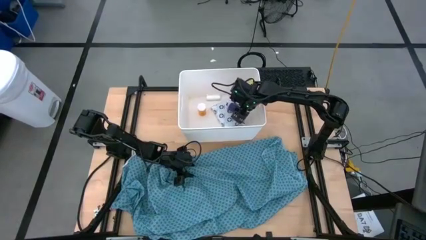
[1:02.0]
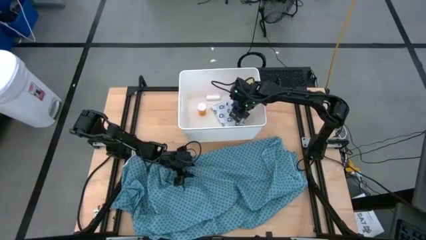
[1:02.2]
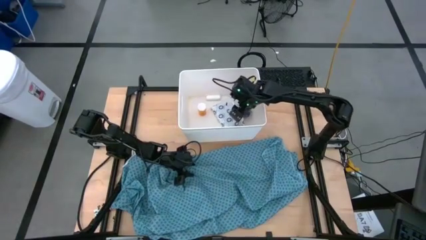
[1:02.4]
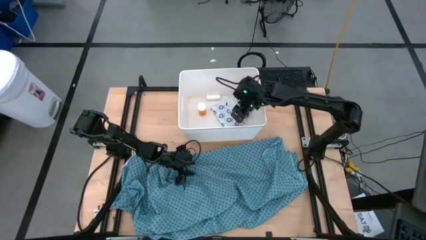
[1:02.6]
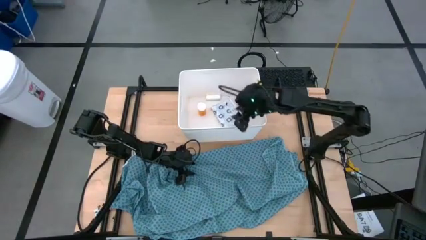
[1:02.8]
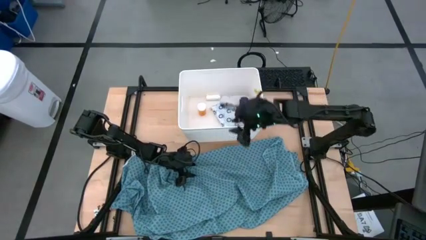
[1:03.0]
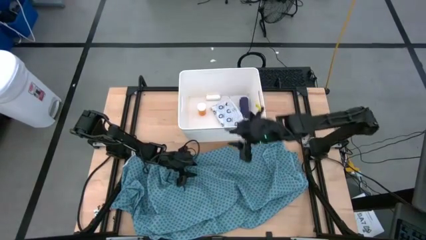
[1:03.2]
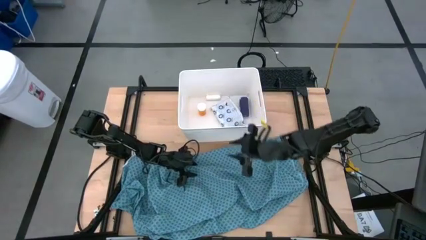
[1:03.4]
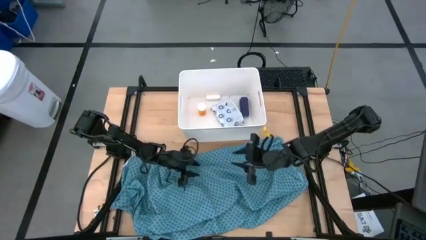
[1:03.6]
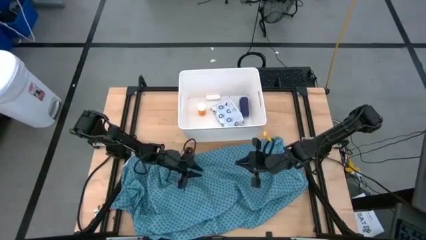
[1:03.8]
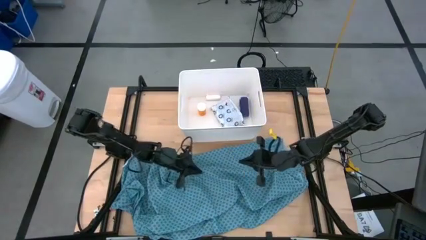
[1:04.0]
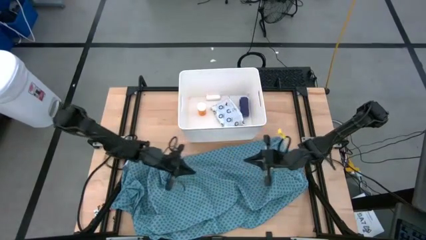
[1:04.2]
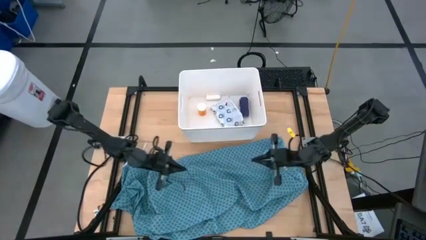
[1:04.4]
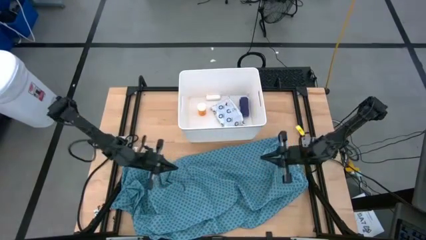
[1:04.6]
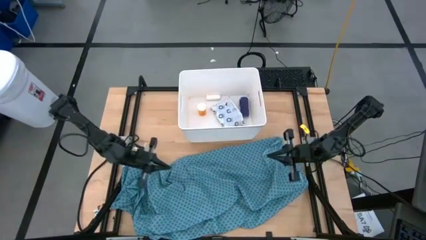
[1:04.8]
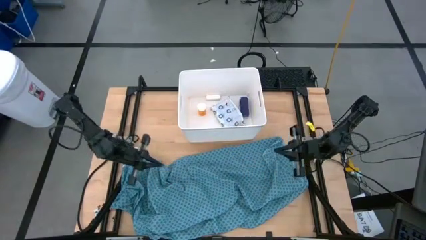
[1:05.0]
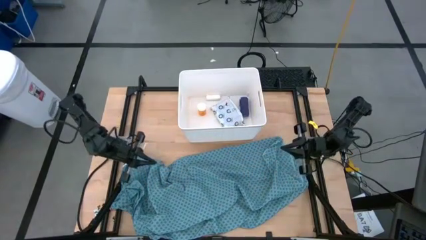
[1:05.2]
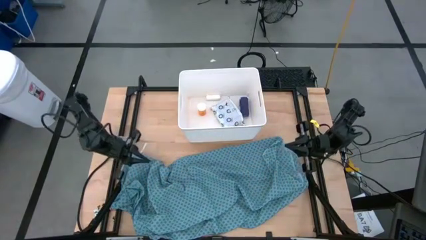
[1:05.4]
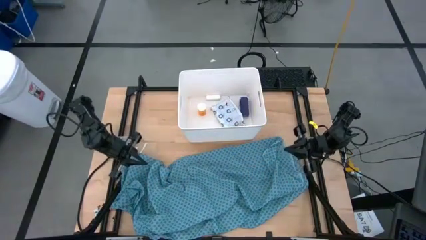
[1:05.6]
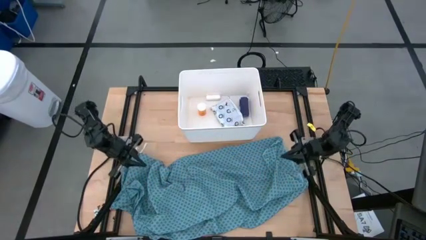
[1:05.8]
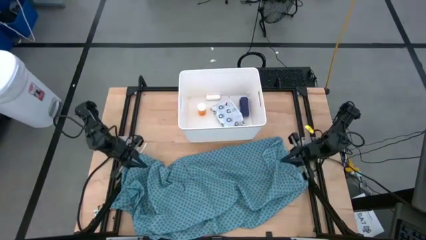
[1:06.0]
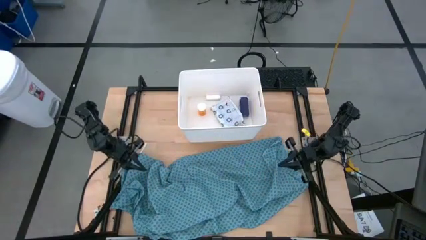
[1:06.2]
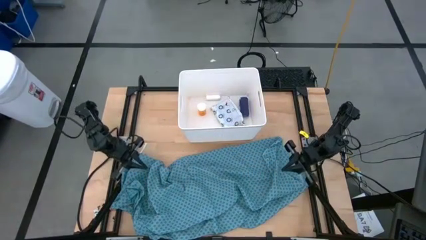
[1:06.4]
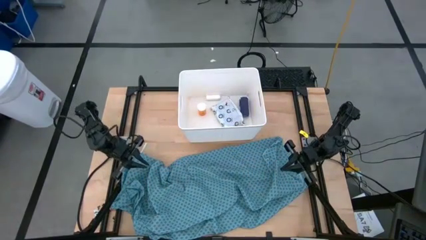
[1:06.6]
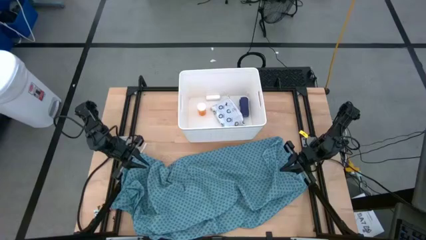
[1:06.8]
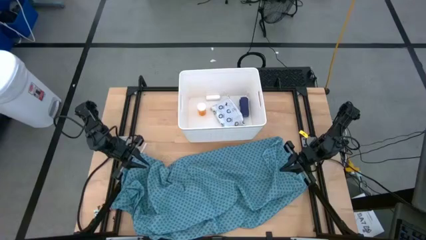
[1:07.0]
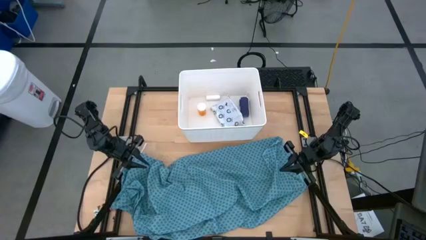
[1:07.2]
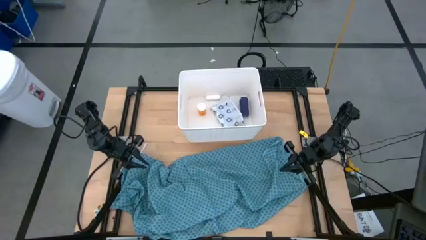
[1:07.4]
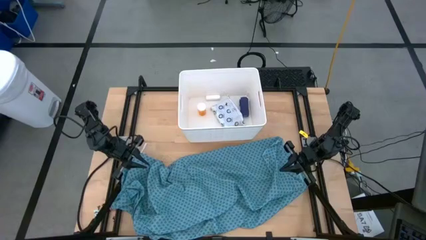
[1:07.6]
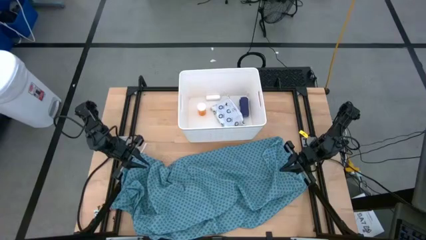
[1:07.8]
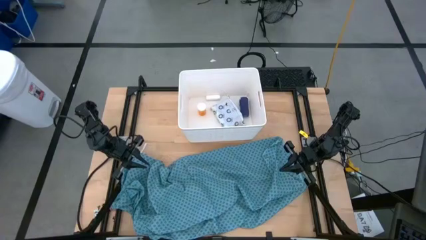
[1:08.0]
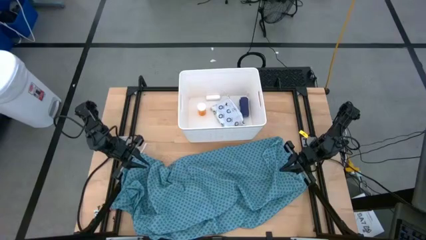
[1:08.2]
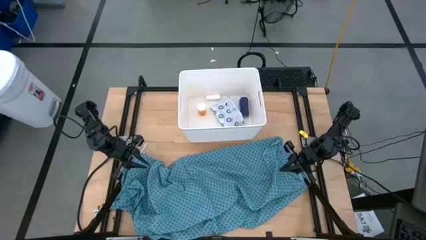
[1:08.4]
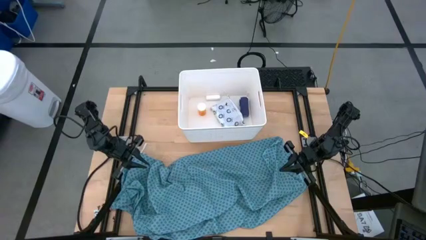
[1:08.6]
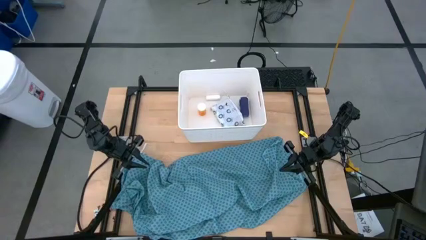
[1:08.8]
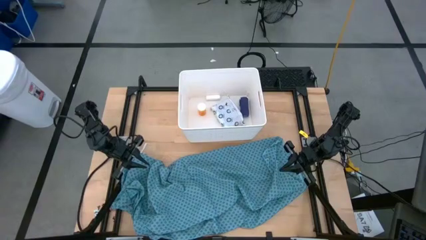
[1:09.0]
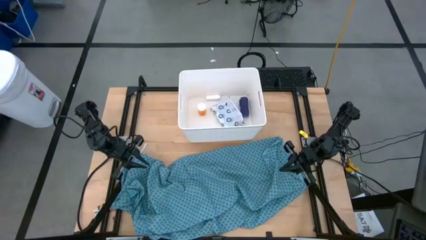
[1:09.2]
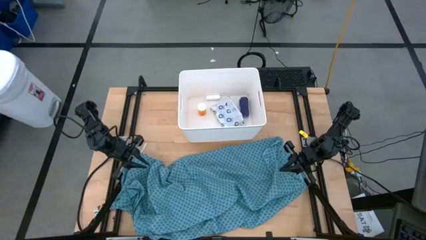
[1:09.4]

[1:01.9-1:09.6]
Task: Pick & place medical supplies in basket/bin
Return to Home Position

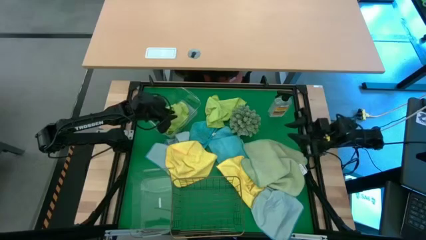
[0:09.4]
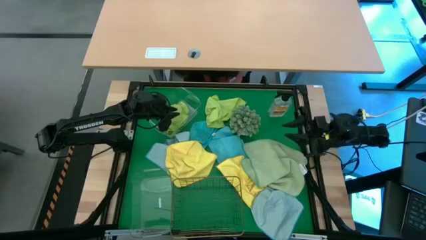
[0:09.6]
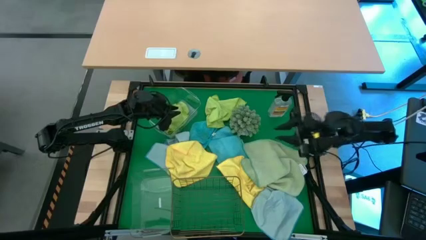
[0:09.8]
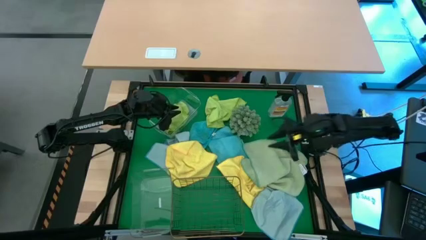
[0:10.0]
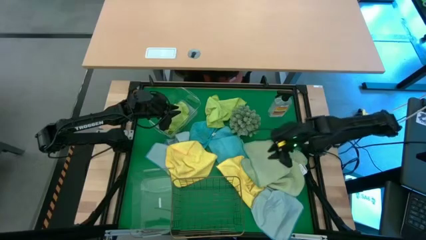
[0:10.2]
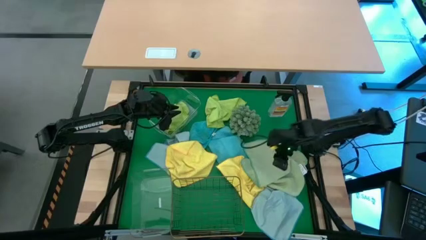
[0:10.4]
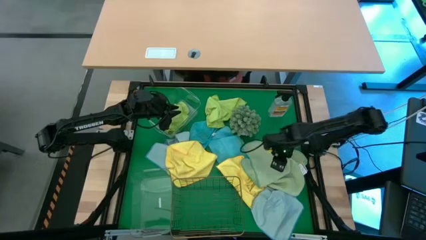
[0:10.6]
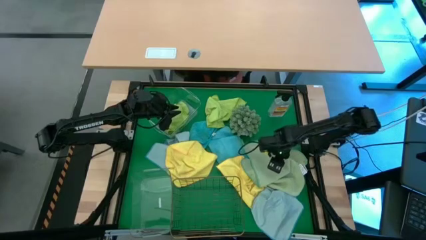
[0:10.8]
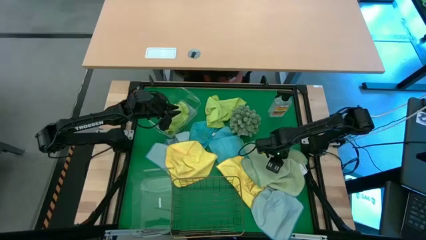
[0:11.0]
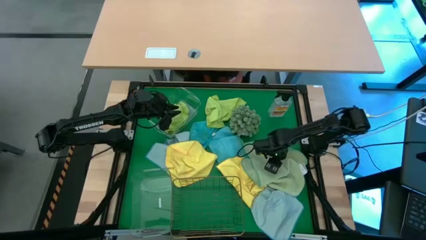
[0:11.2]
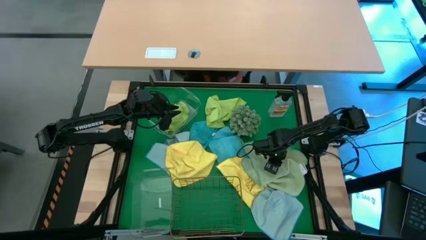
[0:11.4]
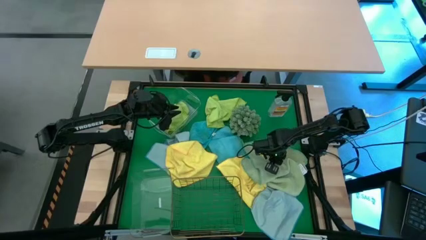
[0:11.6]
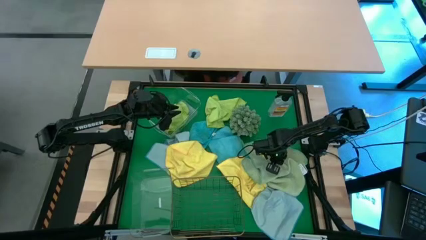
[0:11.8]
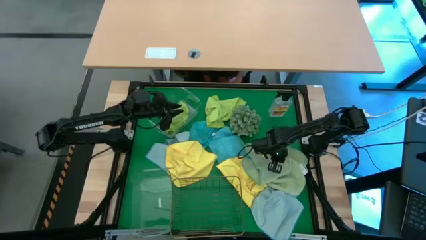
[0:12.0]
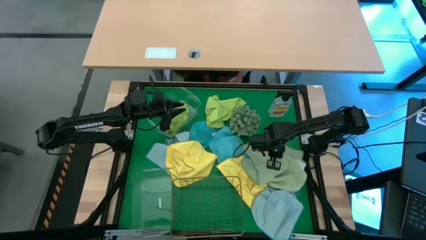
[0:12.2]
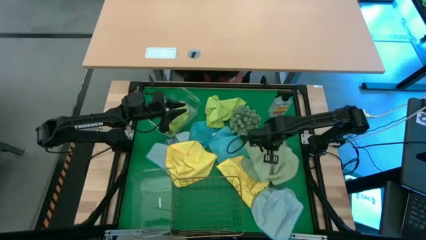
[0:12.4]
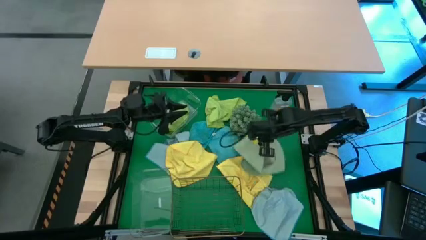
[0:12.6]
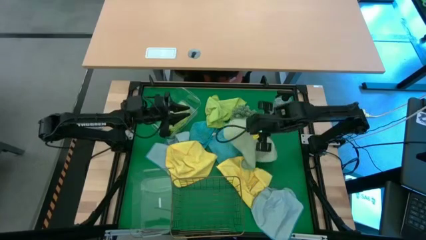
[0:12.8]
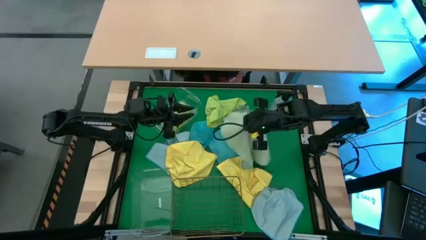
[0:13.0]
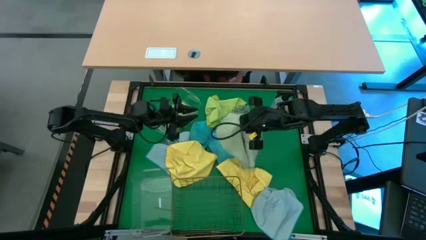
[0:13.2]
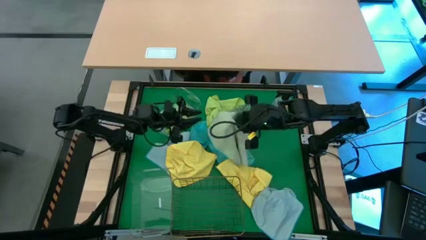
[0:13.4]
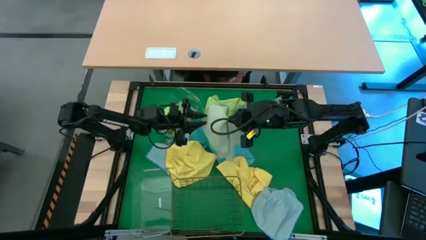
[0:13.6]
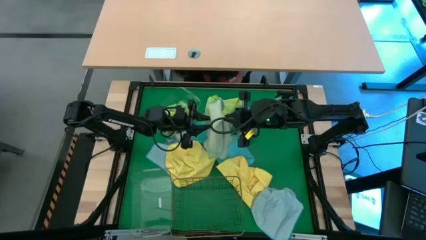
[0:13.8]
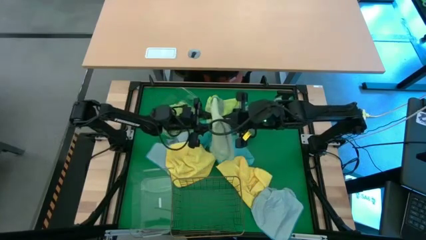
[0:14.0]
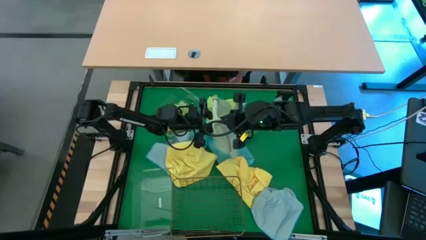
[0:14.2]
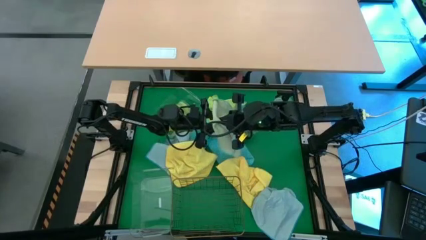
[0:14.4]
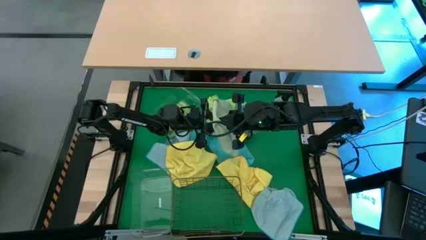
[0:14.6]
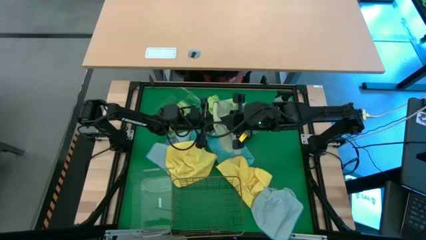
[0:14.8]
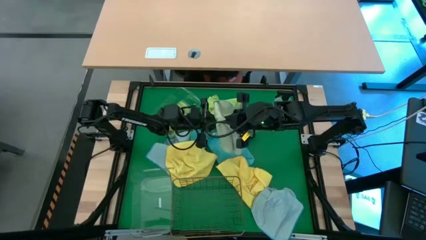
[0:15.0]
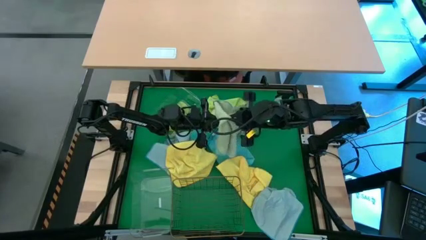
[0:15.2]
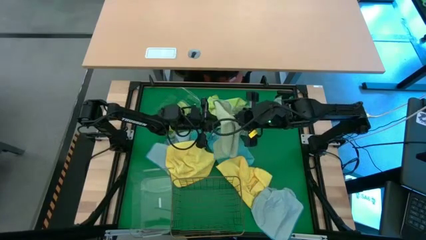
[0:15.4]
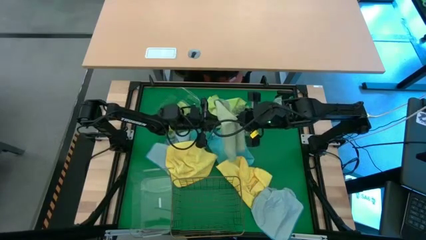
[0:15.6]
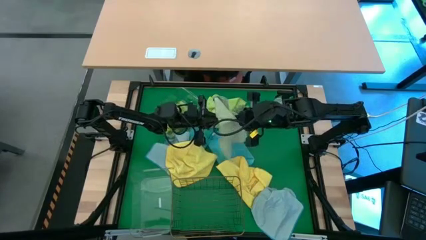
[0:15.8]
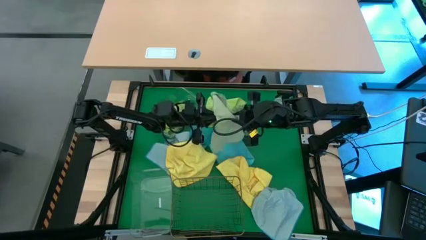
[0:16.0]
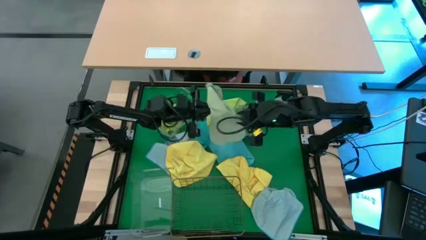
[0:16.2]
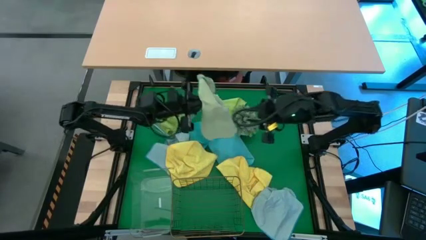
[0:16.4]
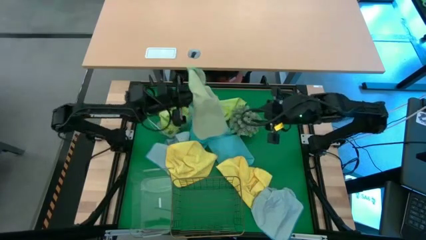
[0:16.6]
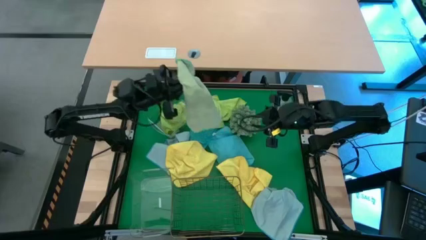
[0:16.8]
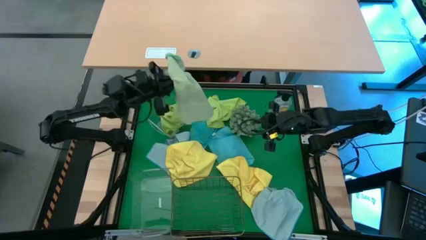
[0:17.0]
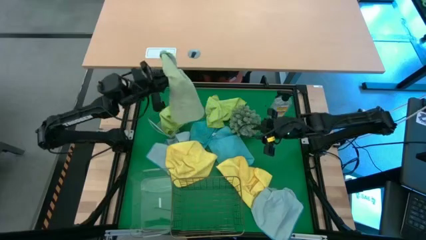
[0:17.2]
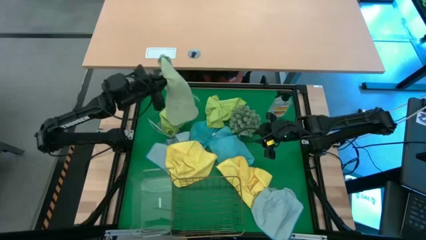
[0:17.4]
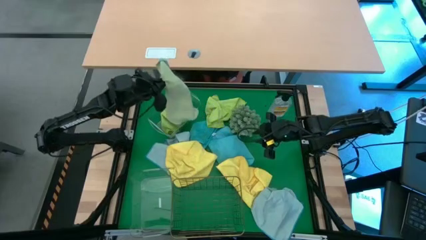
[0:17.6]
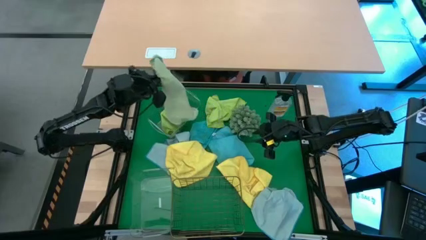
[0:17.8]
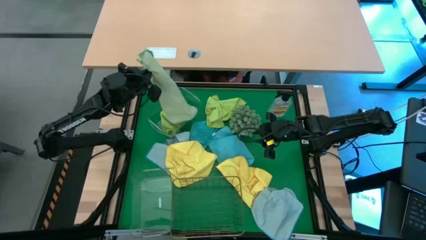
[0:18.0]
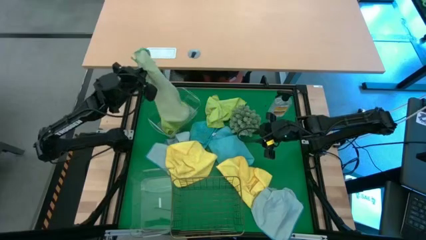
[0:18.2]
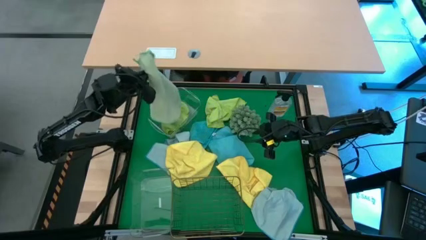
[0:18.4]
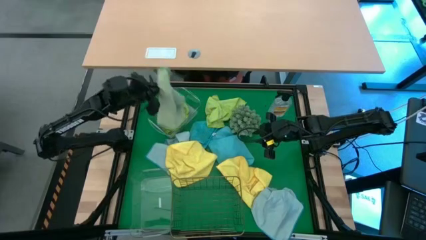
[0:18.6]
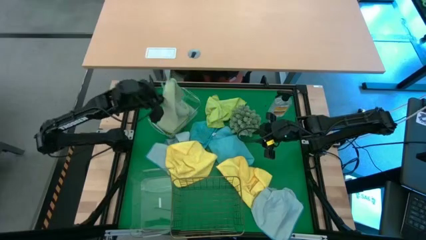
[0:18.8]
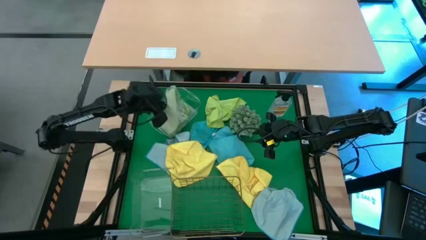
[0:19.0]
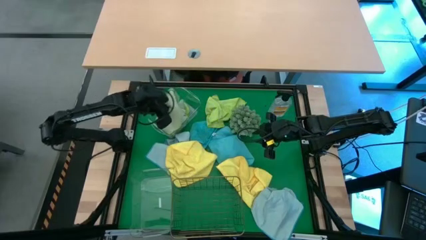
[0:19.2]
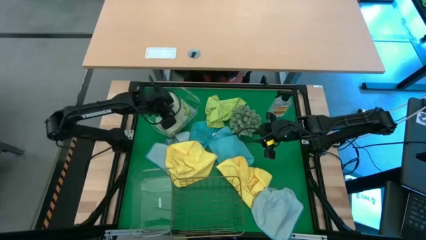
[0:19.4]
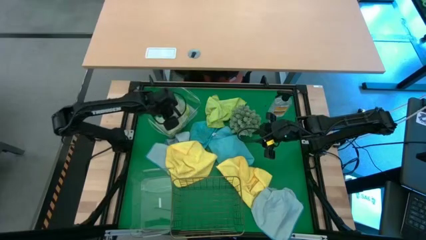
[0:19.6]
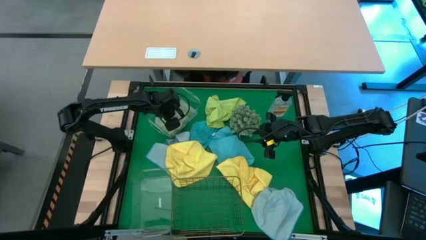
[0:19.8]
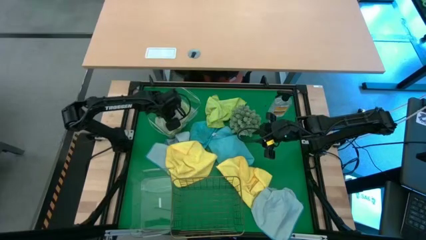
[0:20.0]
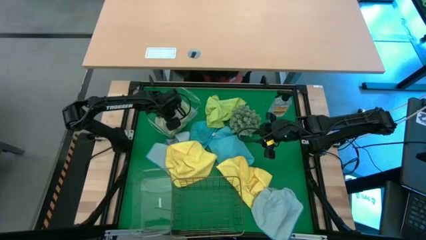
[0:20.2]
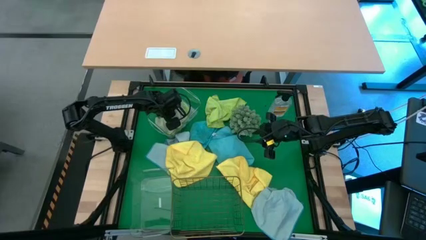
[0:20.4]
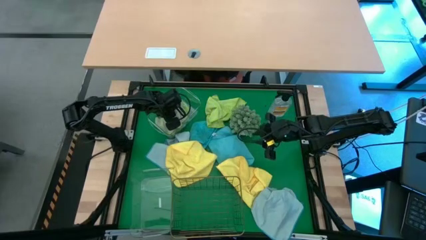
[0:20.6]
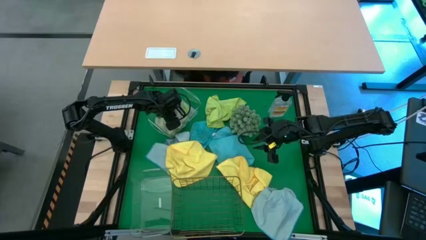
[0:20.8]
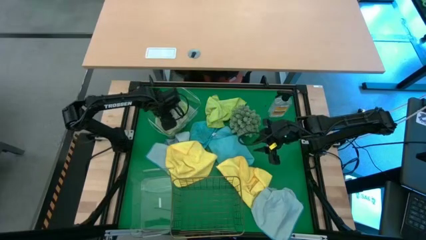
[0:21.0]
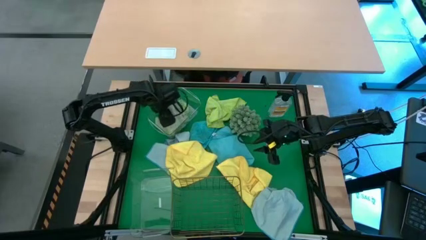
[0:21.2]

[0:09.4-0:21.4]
Task: Sort microfiber towel by color & place in baskets
Put the green microfiber towel into the top transparent bin
